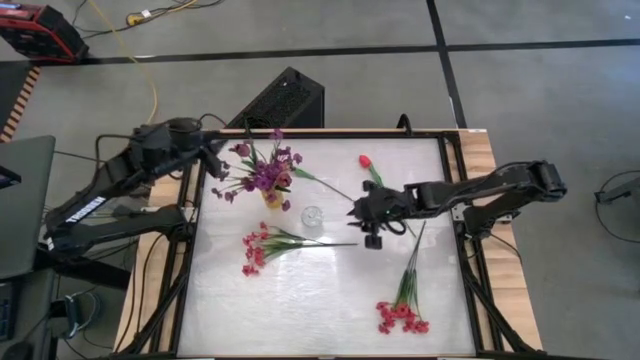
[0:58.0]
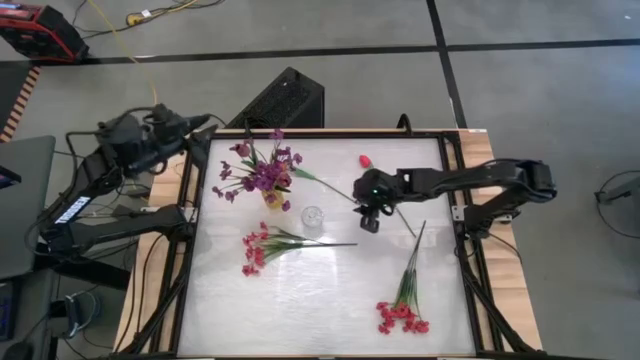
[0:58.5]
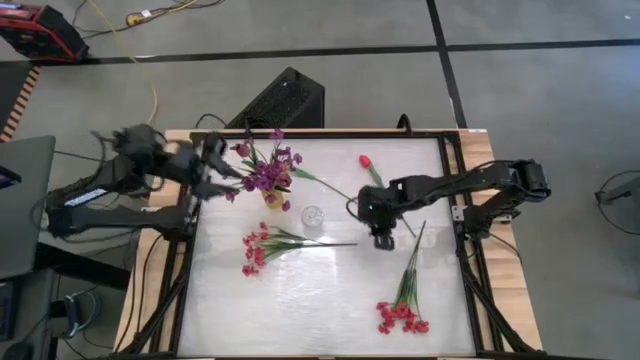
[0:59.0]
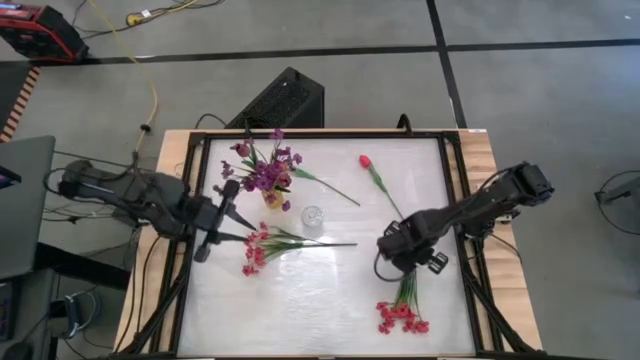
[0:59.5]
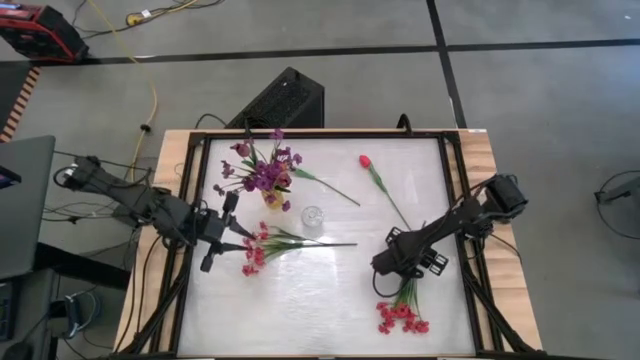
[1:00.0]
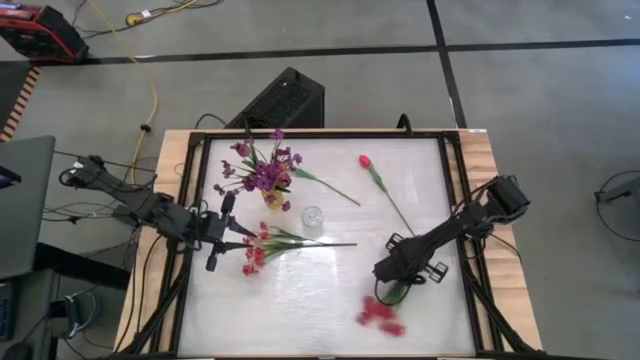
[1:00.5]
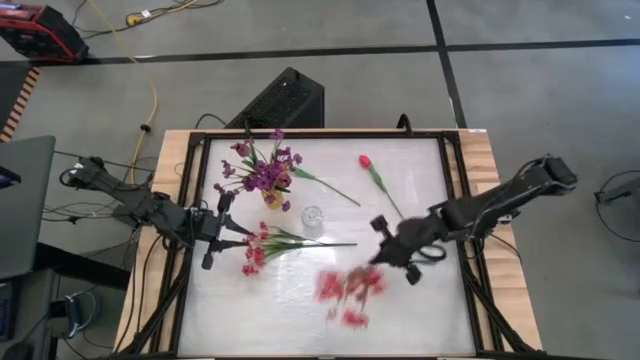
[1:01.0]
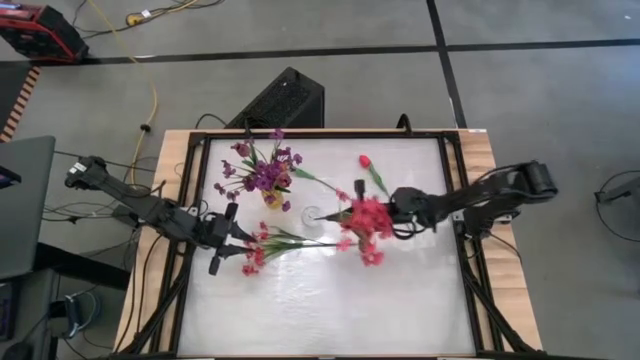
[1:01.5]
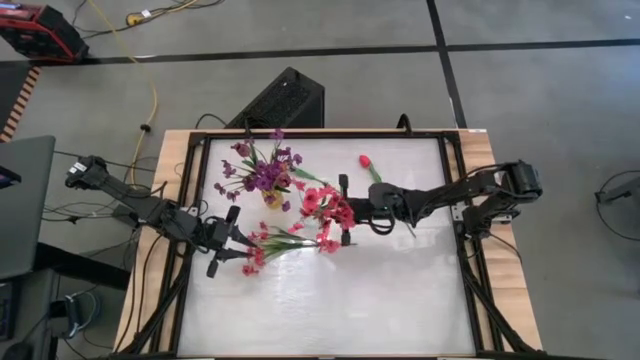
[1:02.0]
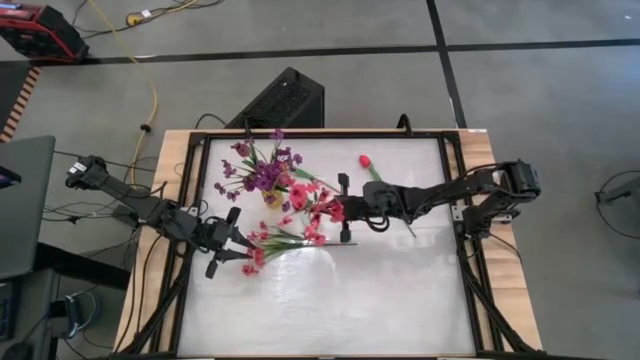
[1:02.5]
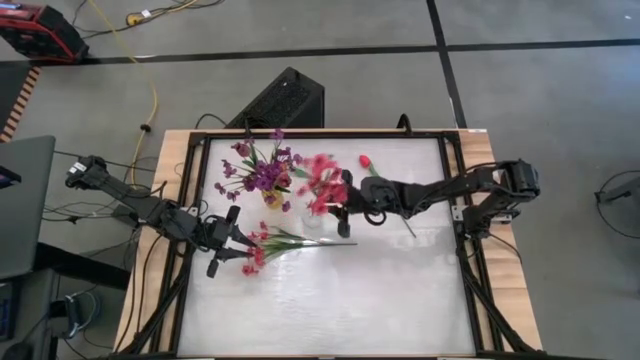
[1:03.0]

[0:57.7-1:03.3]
Task: Sort flowers into vase by color
Put the right pink flower into the transparent flower vase

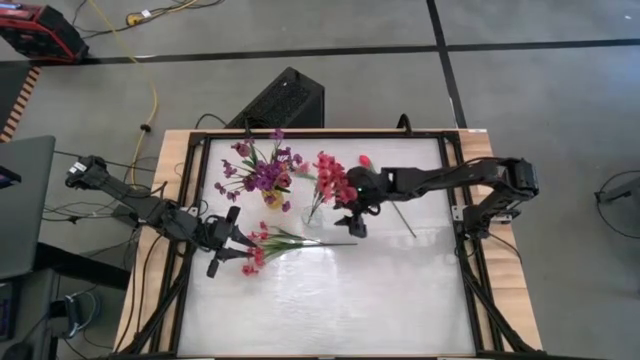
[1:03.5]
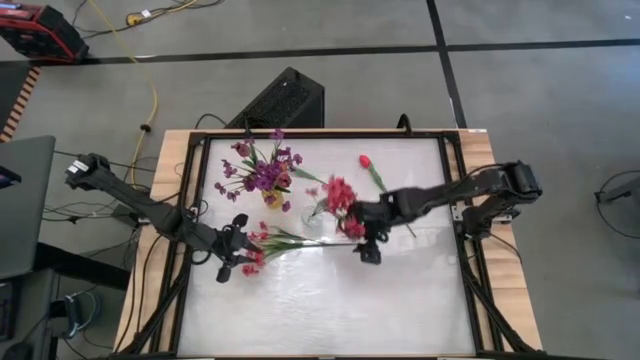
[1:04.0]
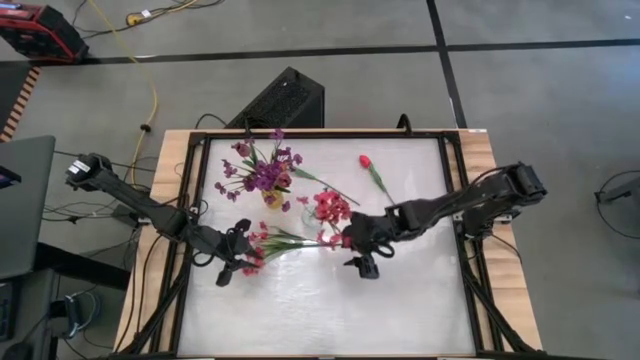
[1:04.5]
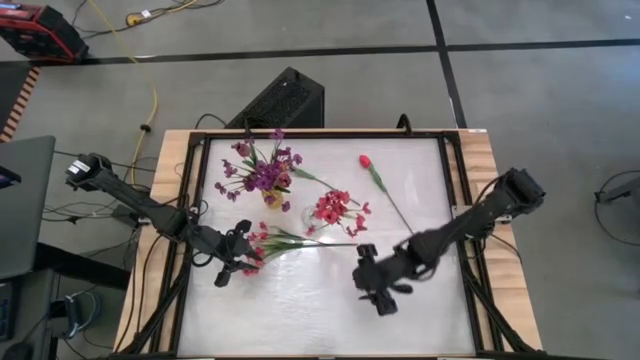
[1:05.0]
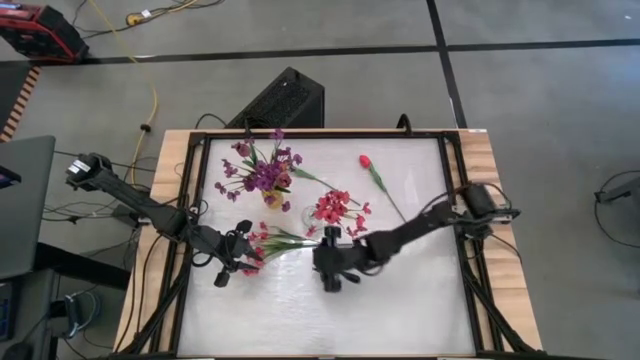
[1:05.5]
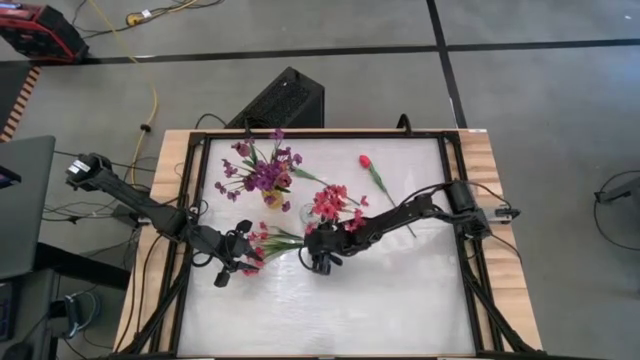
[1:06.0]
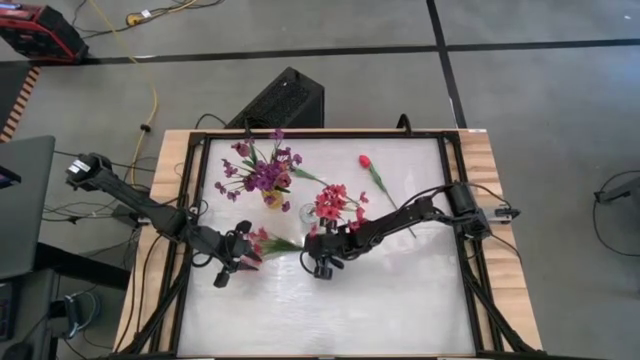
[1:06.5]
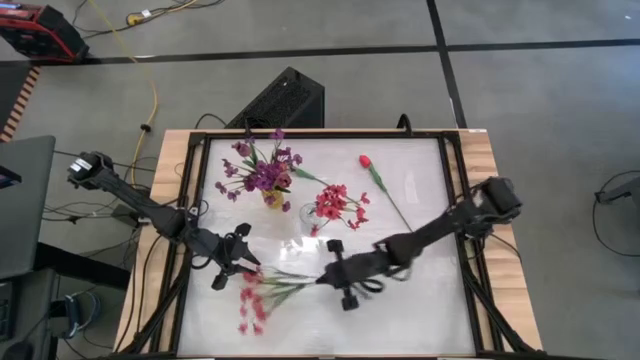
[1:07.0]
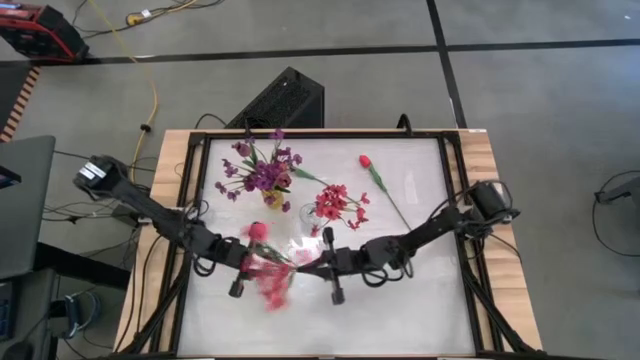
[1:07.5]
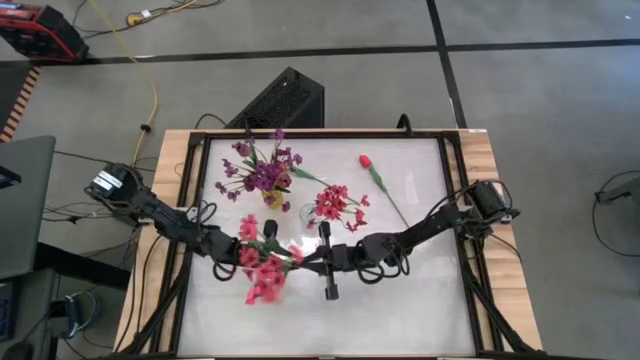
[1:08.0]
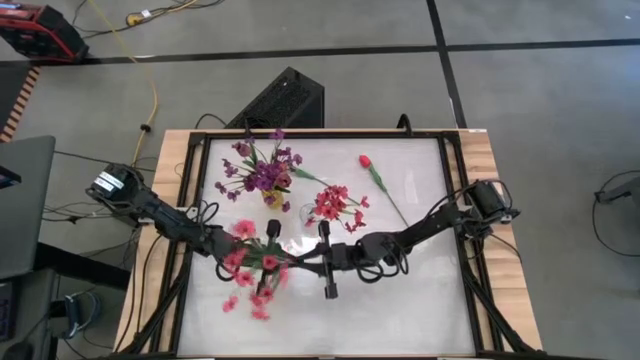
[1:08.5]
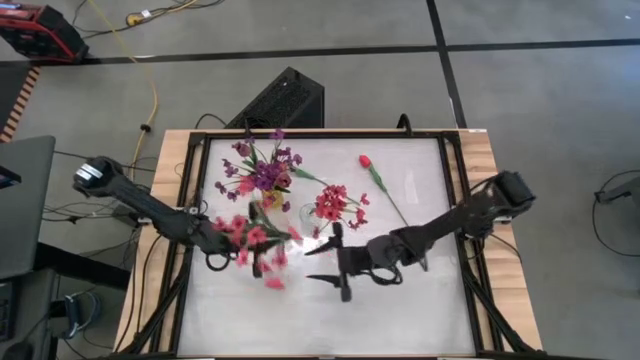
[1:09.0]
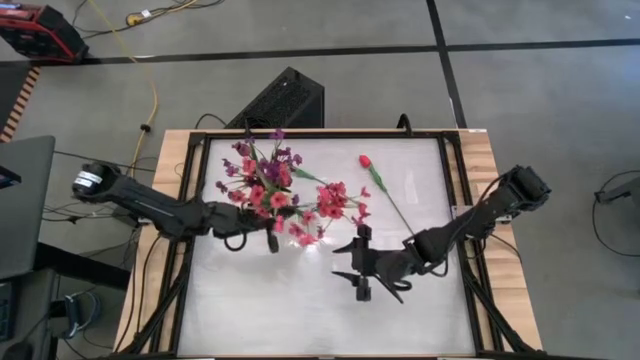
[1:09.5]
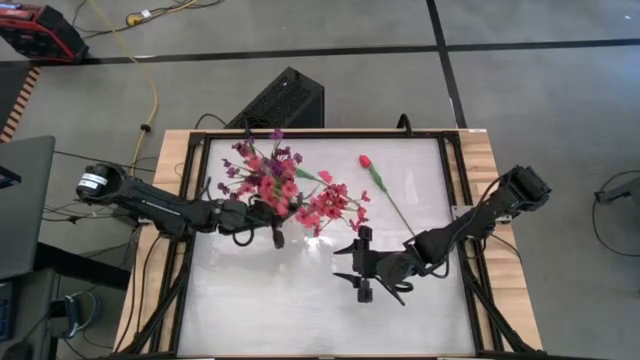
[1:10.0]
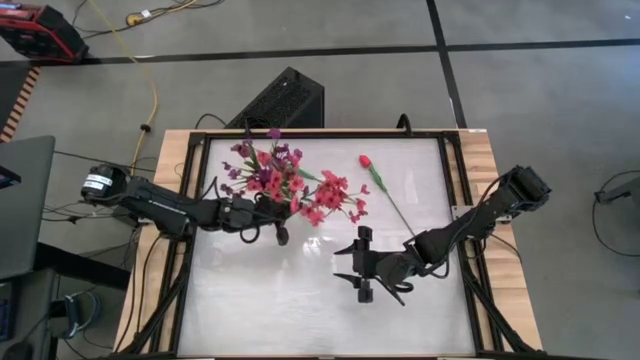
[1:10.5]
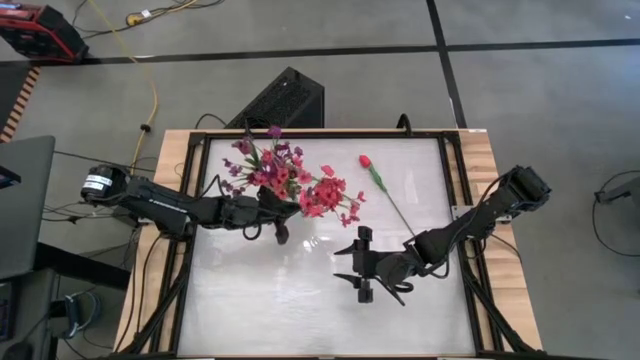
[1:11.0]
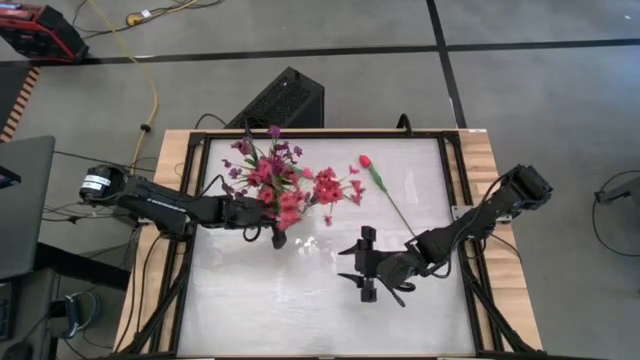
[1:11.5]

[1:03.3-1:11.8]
Put the pink flower into the transparent flower vase

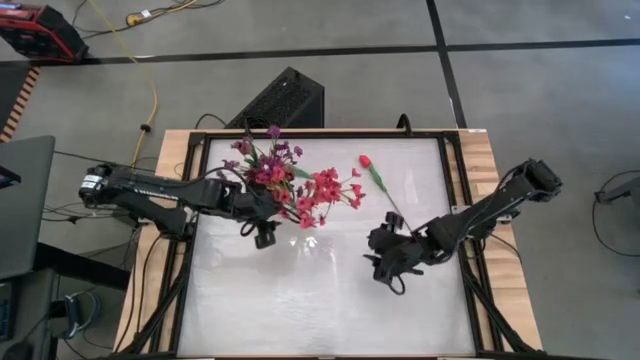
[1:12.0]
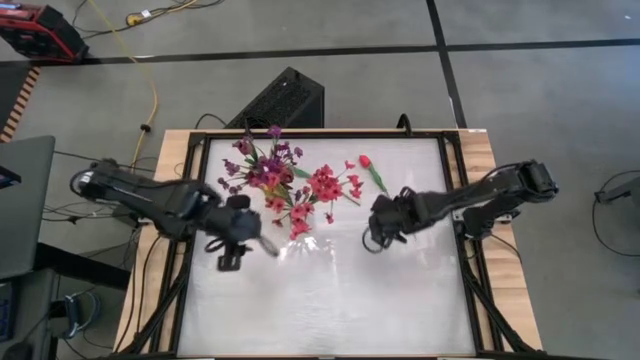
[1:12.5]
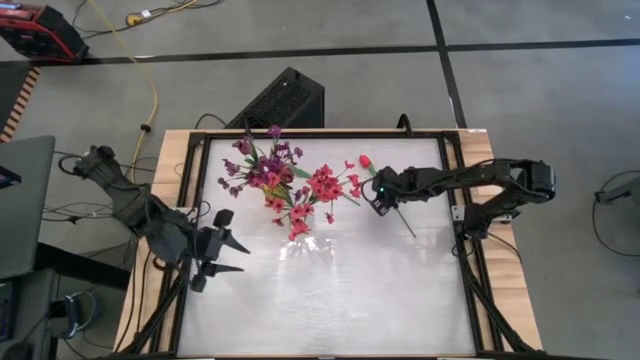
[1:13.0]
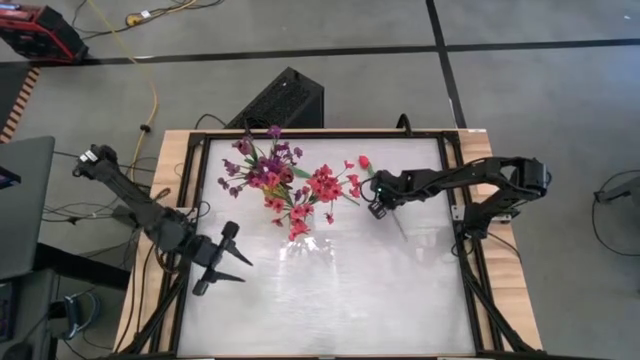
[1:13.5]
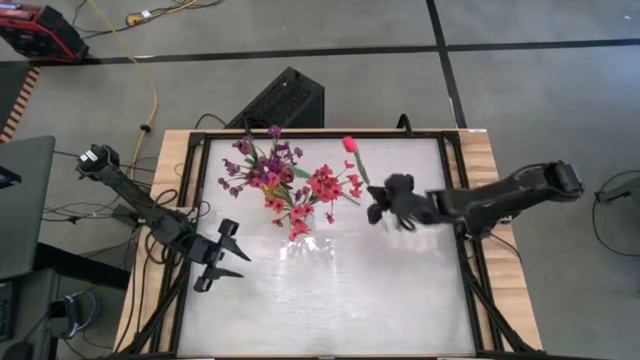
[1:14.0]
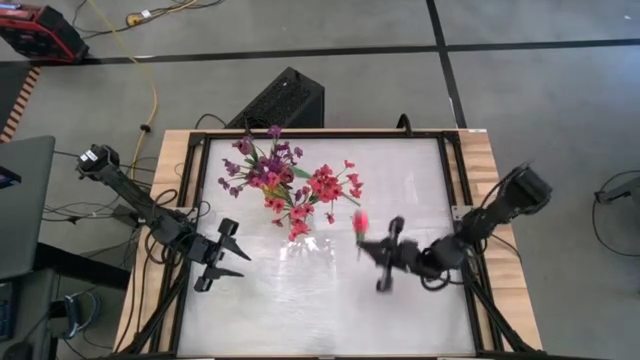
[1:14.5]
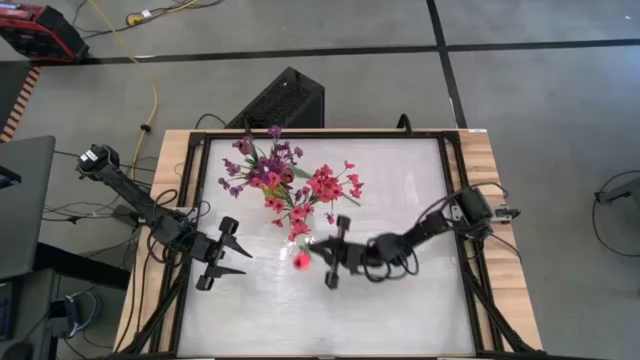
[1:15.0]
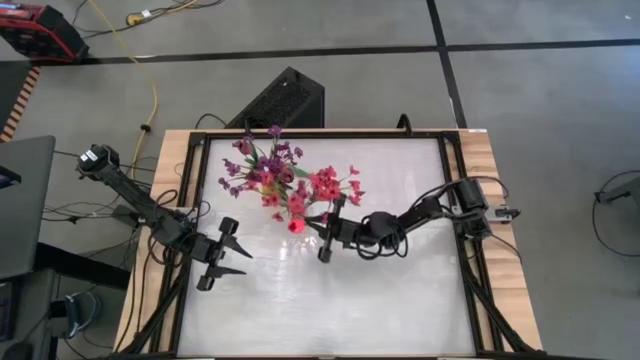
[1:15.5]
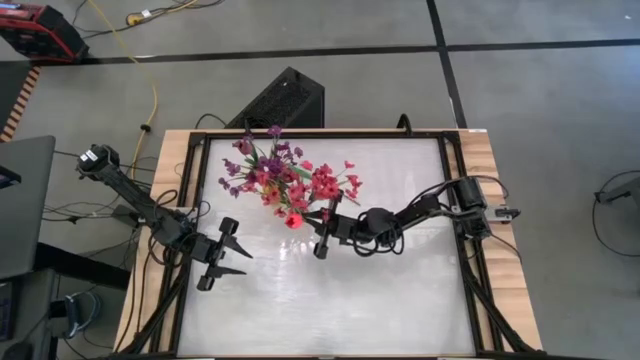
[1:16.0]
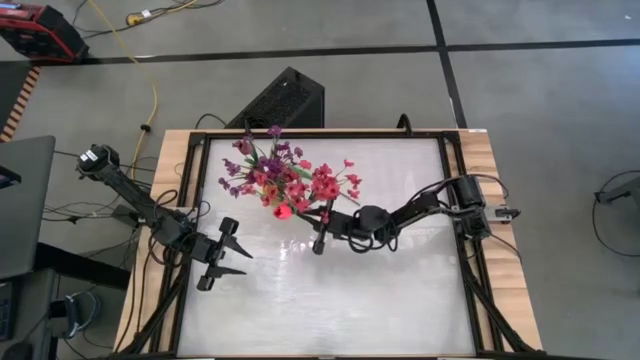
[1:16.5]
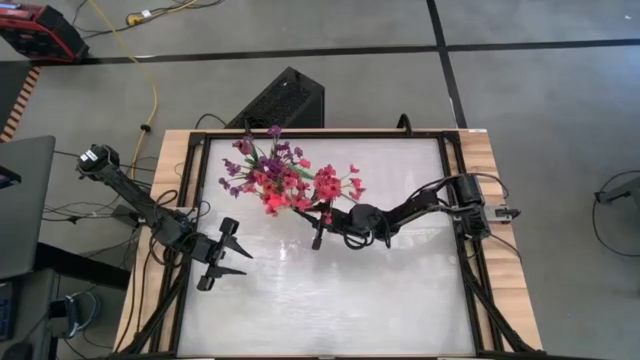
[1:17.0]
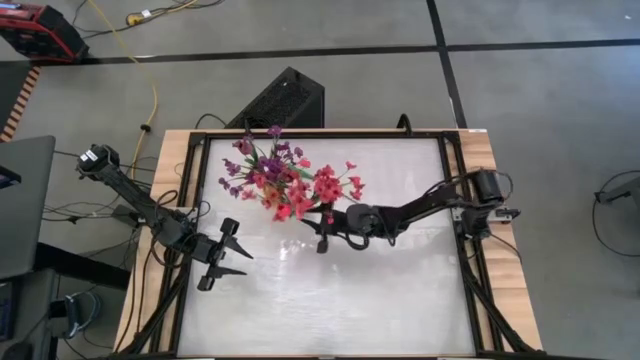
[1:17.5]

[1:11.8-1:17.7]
Put the right red tulip into the transparent vase

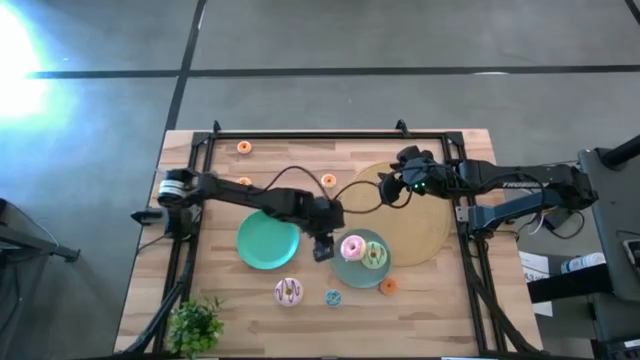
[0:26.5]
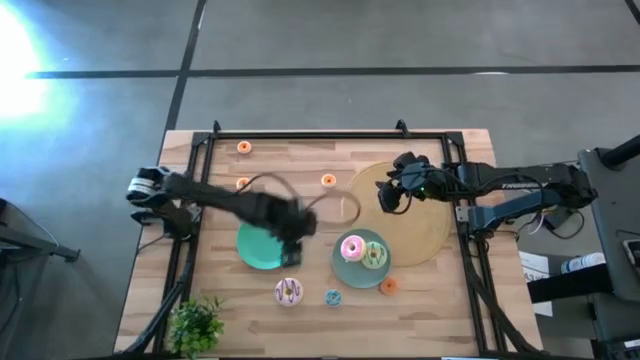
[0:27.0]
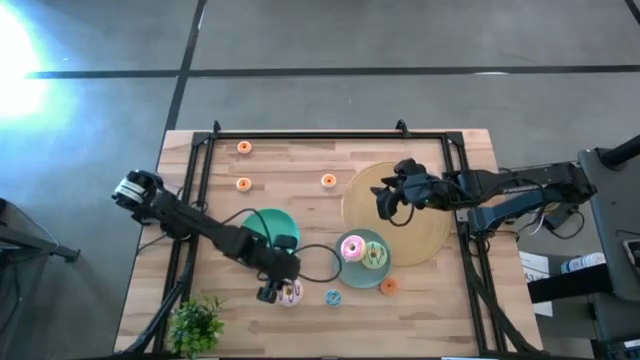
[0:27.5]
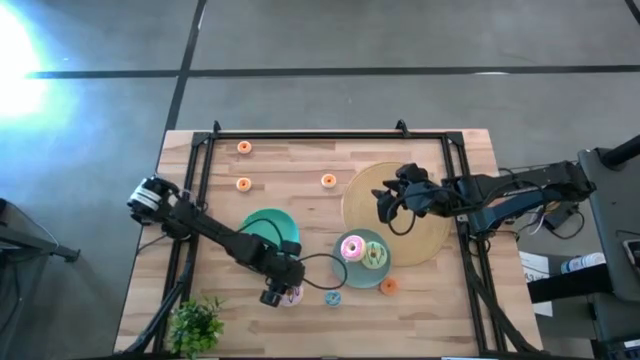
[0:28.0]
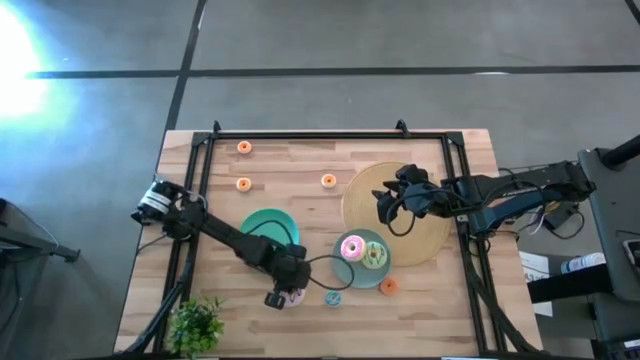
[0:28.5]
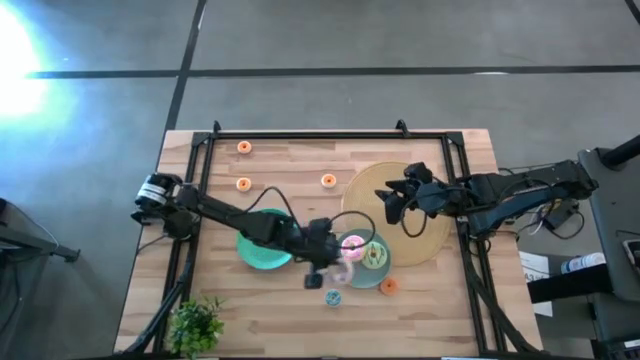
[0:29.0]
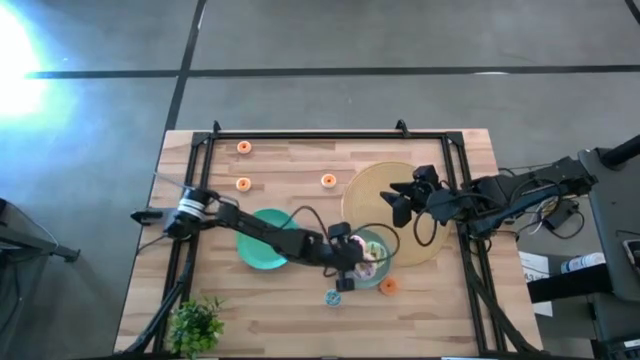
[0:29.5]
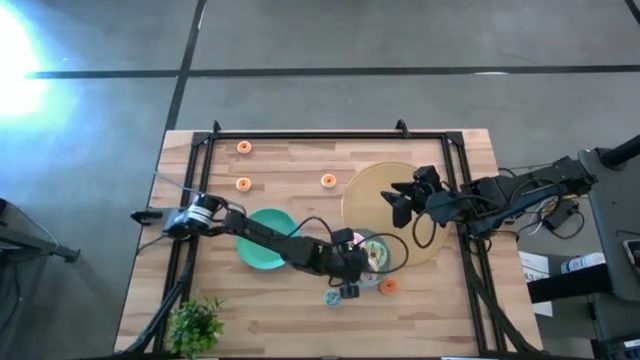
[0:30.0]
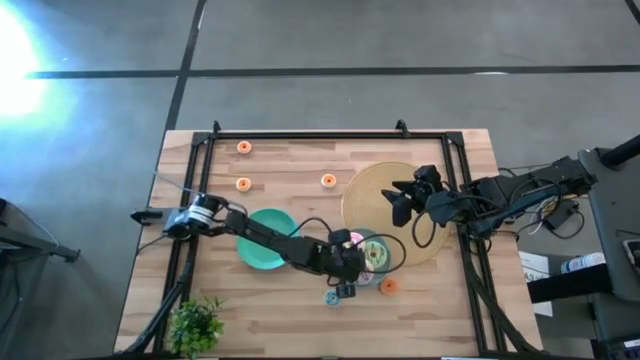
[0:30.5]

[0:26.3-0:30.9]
Task: Pick & Place donuts
Put the big purple donut on the gray plate
